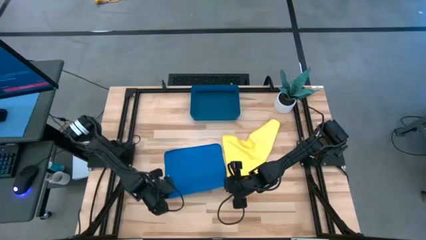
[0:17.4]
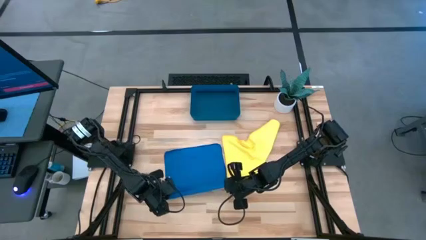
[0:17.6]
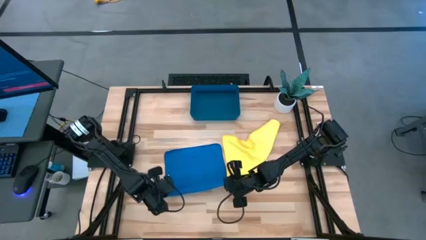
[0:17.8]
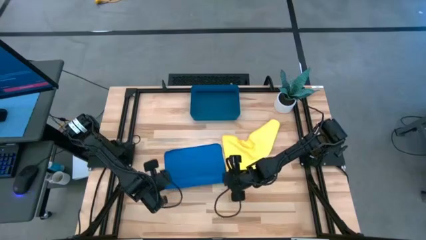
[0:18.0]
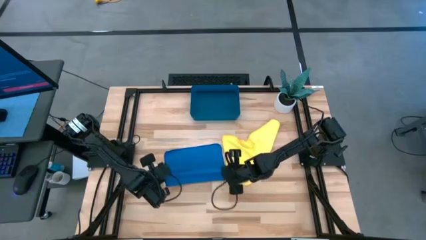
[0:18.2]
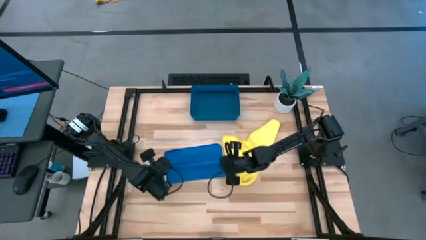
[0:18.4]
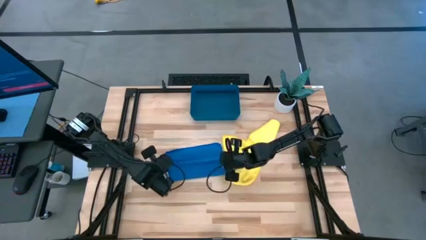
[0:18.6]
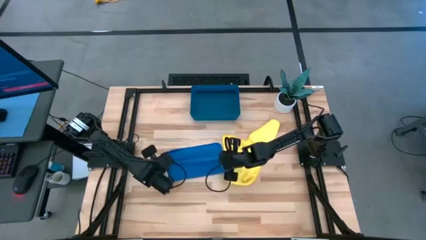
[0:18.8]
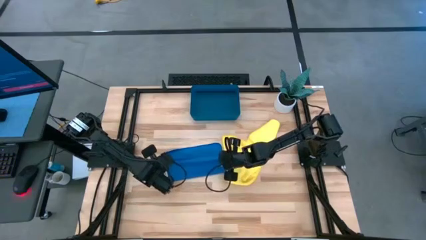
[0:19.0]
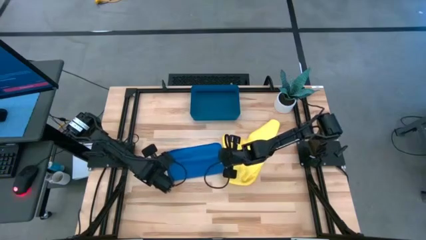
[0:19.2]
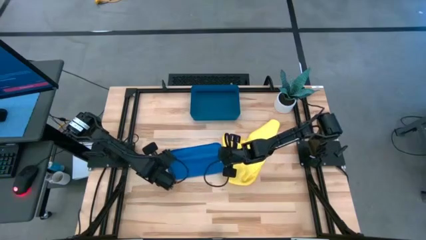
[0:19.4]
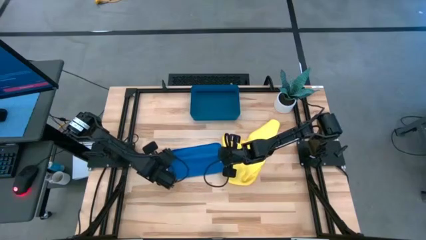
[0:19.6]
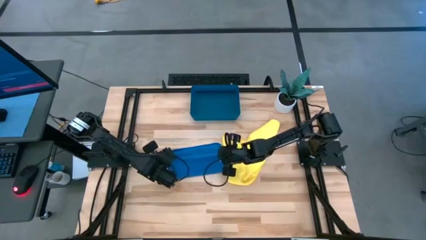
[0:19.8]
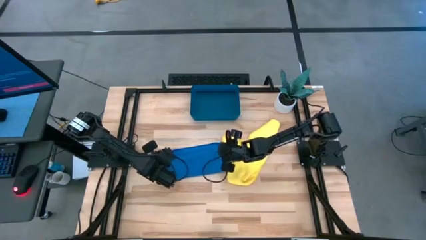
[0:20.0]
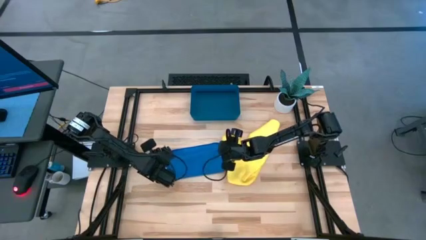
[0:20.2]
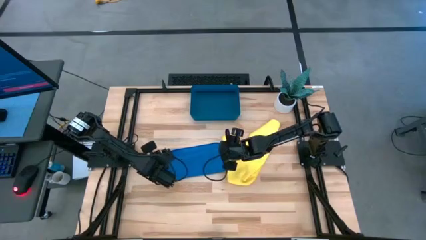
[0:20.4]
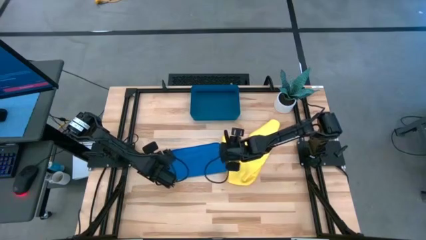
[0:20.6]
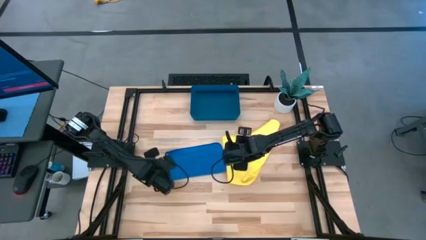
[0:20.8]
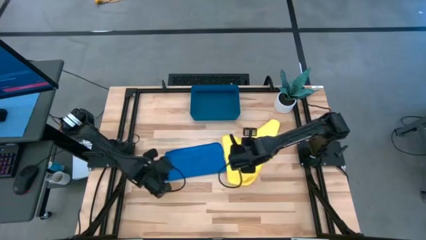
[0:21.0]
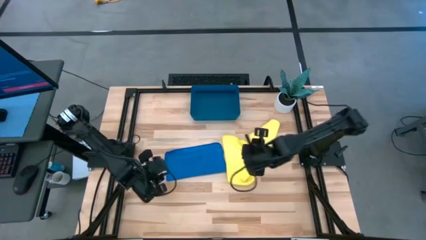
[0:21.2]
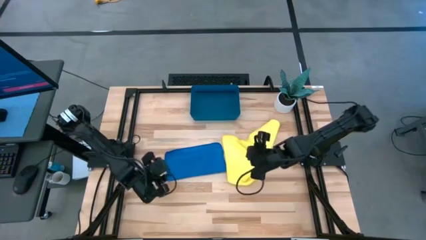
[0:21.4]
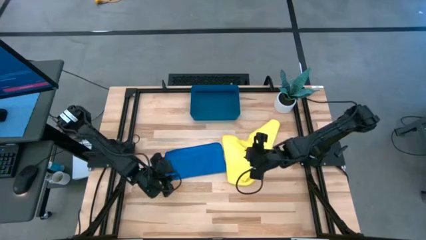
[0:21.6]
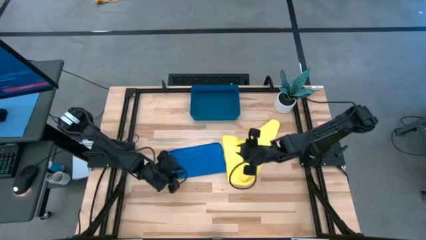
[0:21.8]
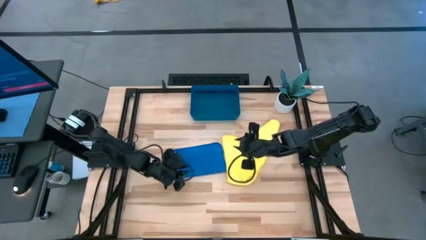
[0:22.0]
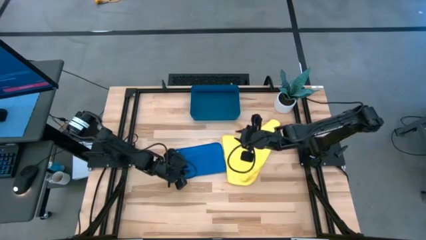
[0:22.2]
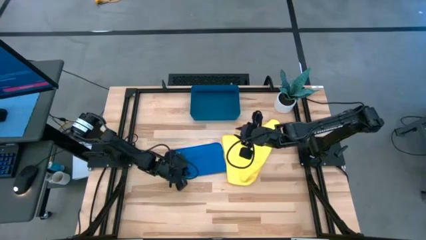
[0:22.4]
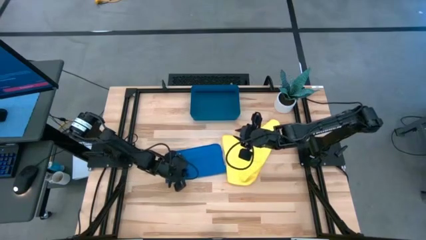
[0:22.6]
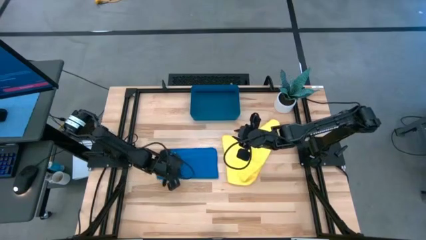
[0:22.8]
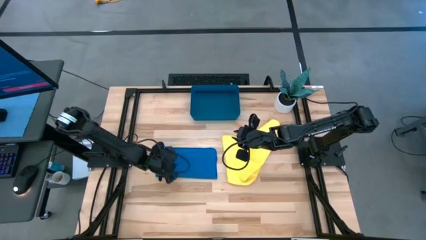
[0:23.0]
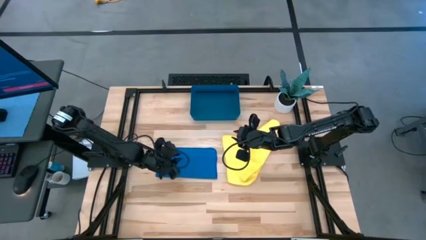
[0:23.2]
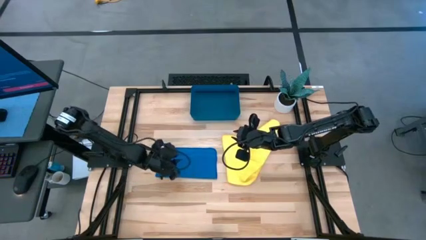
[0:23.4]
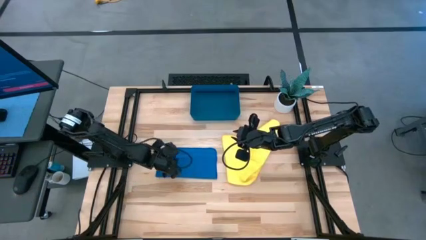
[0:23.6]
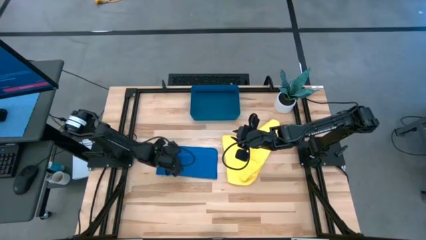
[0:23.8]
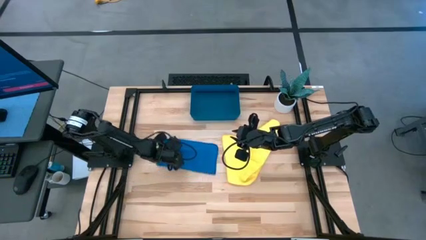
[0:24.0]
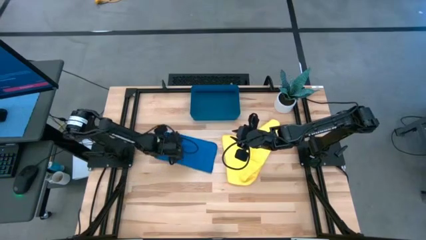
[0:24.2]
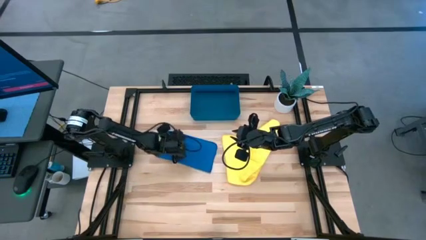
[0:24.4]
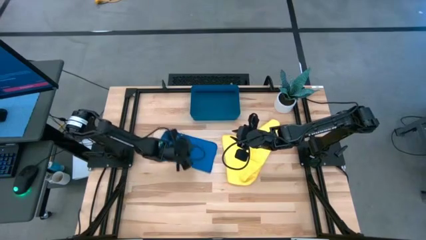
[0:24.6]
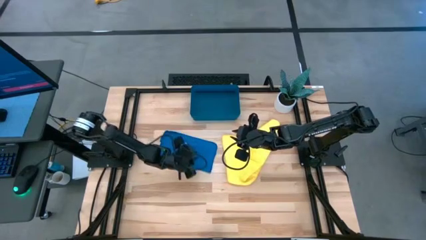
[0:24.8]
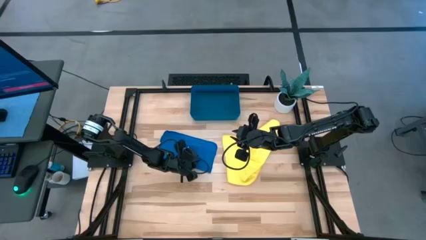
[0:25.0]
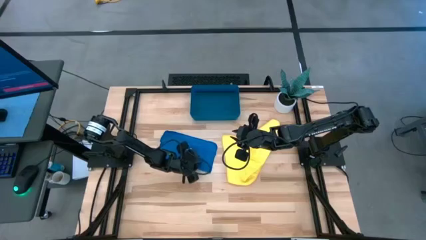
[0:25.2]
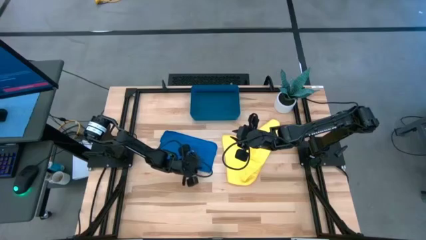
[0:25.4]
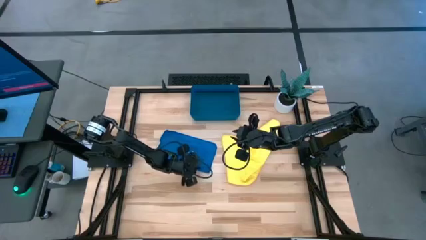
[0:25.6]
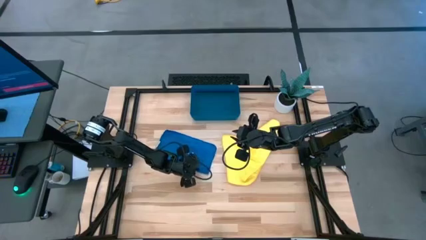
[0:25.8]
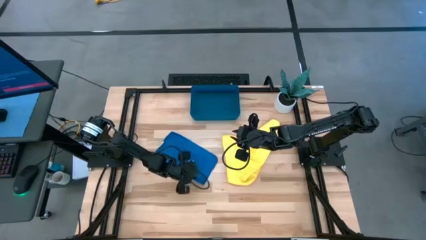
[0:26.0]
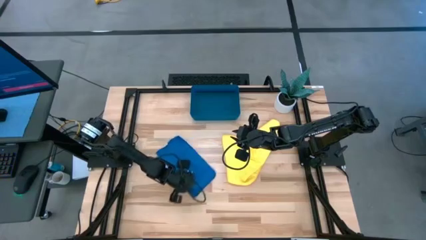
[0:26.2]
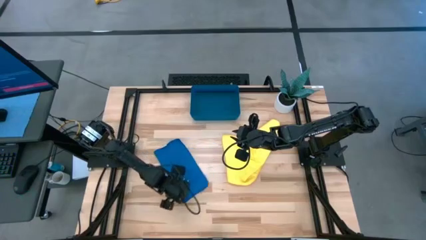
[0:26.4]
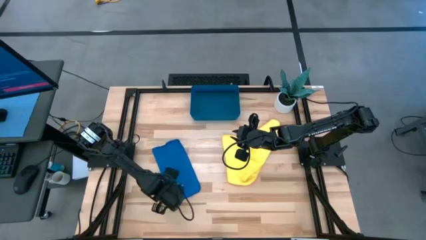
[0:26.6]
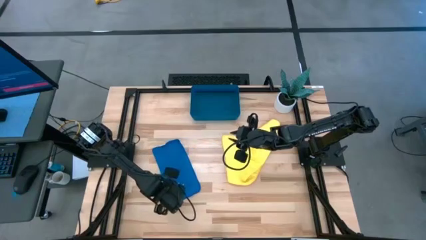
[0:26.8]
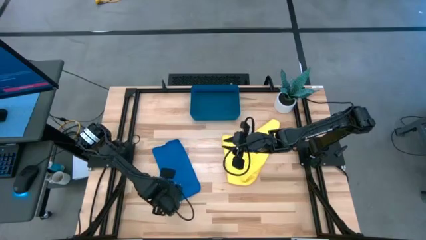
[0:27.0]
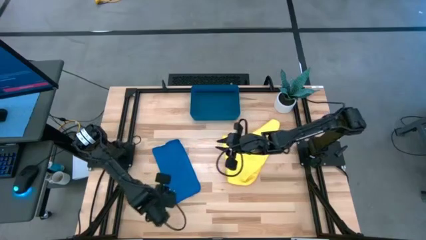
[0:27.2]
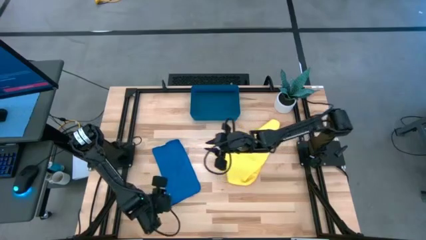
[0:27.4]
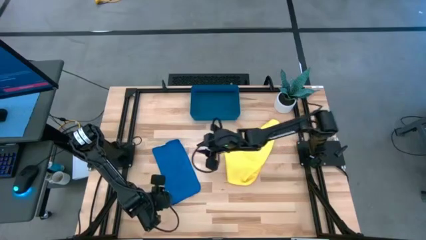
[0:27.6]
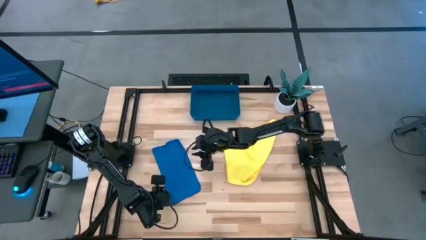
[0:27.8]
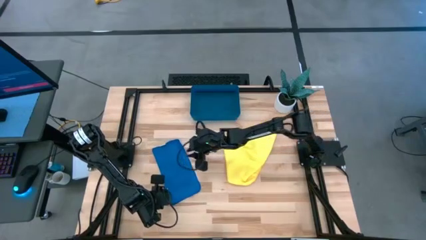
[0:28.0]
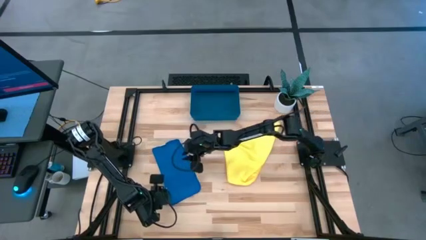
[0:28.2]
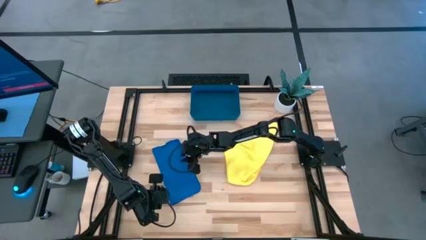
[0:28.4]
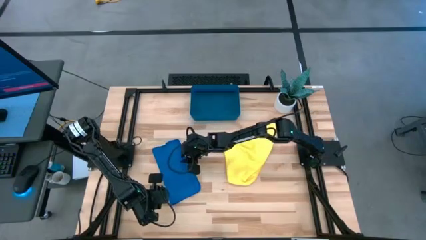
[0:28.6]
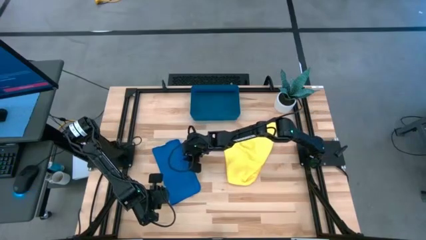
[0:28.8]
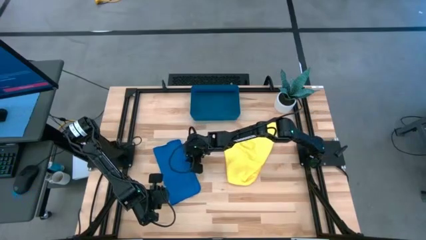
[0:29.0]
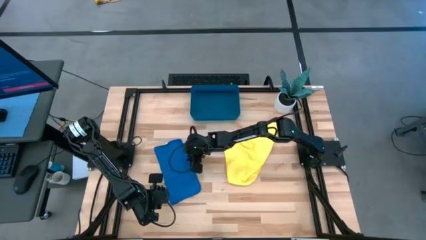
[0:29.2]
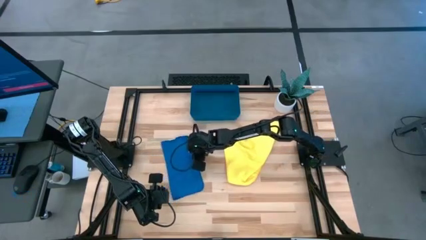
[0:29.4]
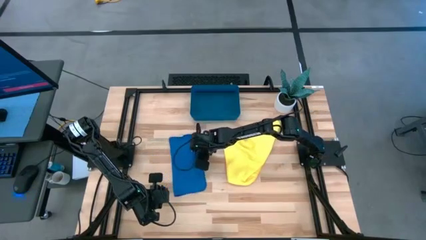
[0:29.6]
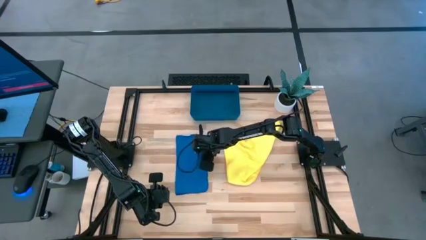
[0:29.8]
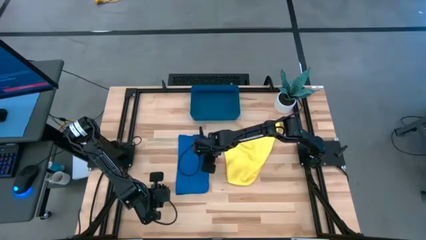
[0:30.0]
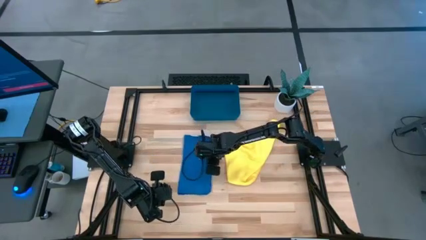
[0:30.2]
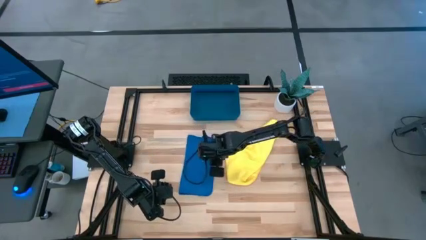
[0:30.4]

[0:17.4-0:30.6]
Task: Roll microfiber towels into tight, uniform cylinder then place into a basket
Fold the blue towel
